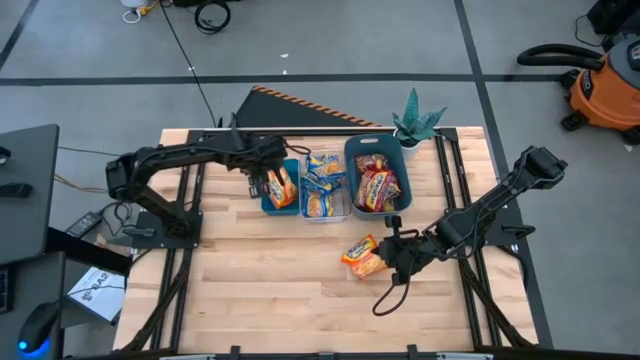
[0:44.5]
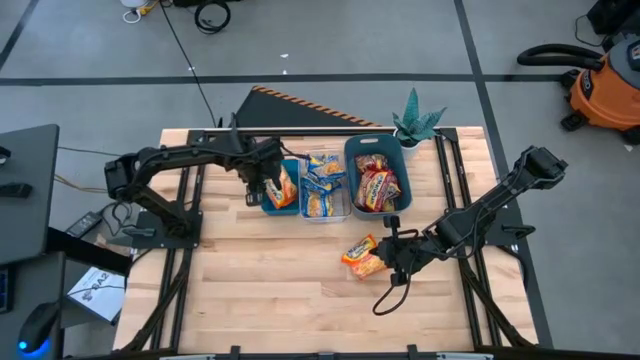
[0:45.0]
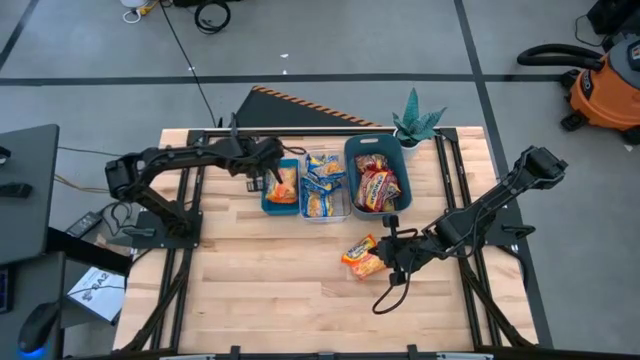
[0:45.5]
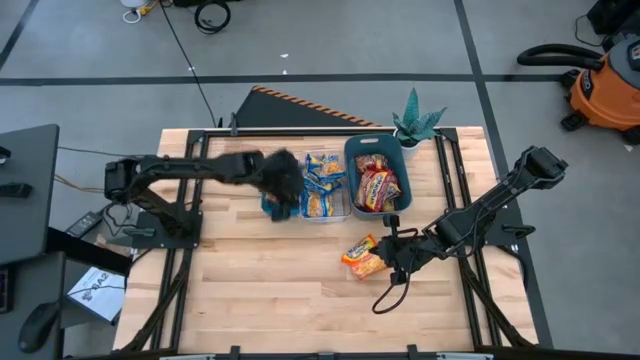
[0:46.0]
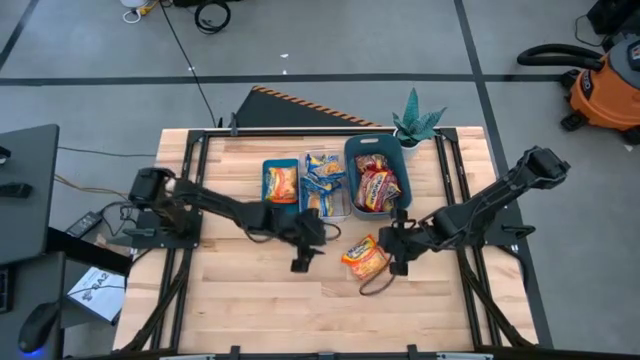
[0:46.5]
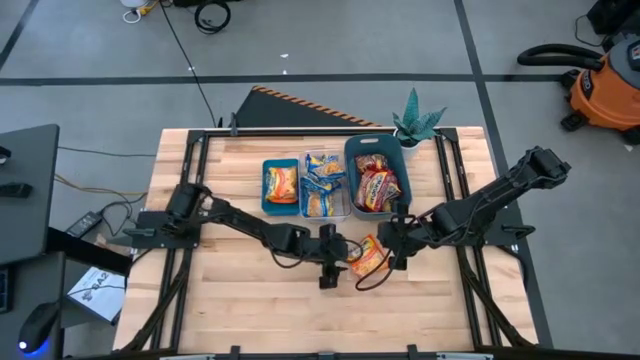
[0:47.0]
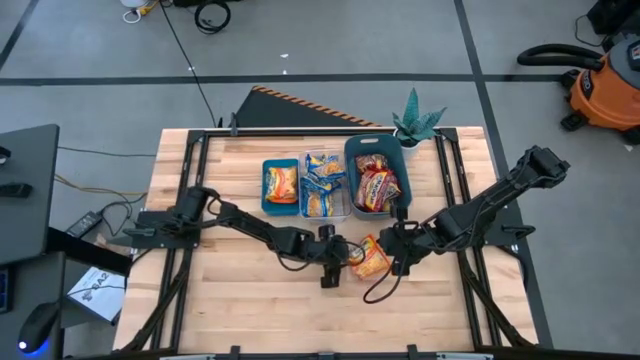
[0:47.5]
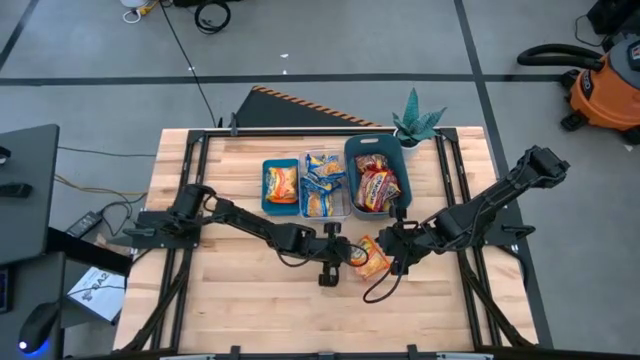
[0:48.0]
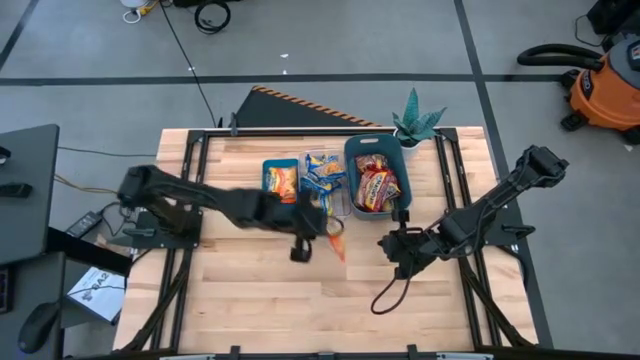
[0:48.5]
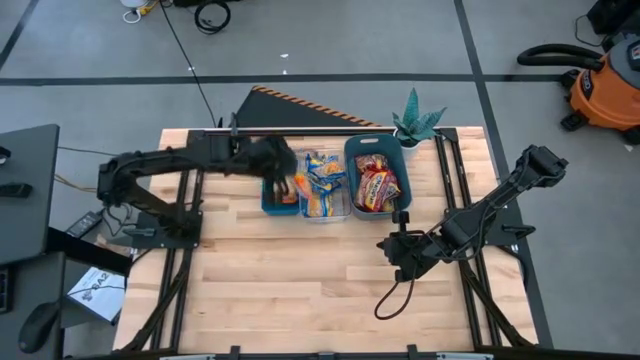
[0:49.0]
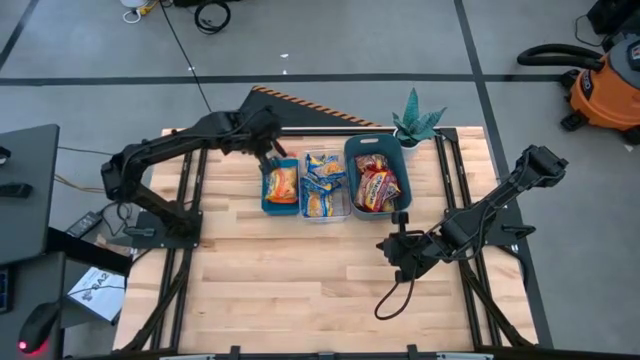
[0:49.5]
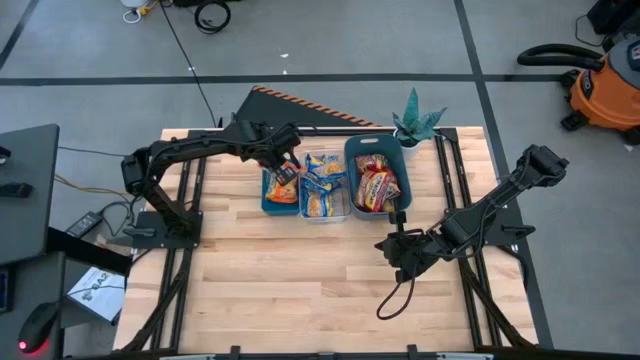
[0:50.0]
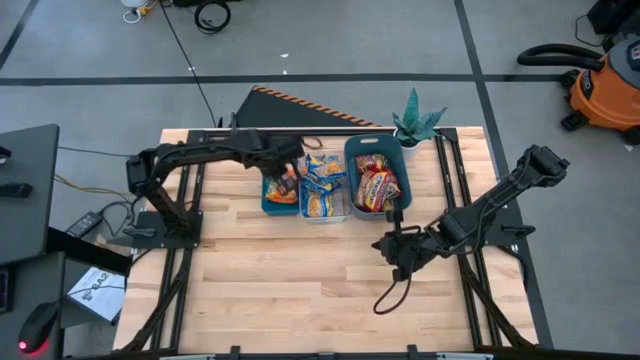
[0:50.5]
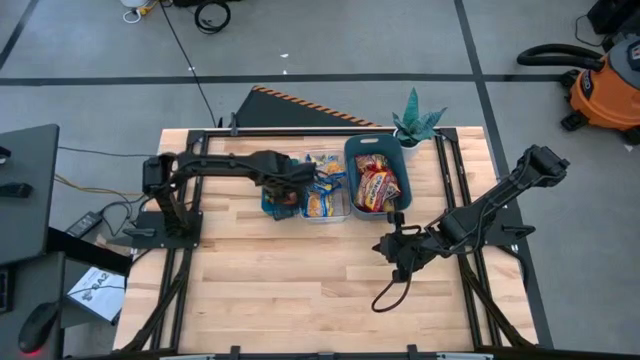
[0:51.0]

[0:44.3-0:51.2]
Task: Sort Maruchan noodles
Put the orange noodle into the blue bin

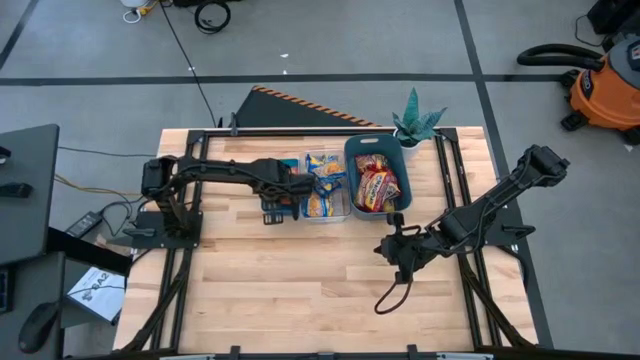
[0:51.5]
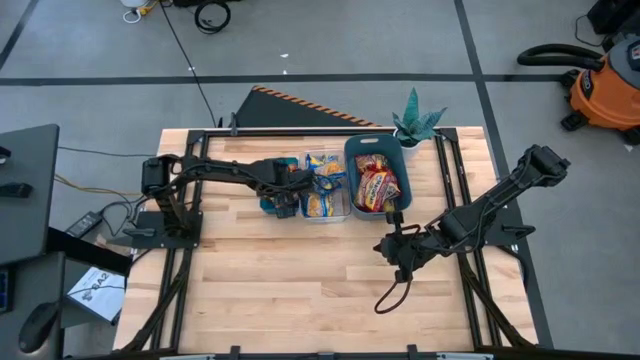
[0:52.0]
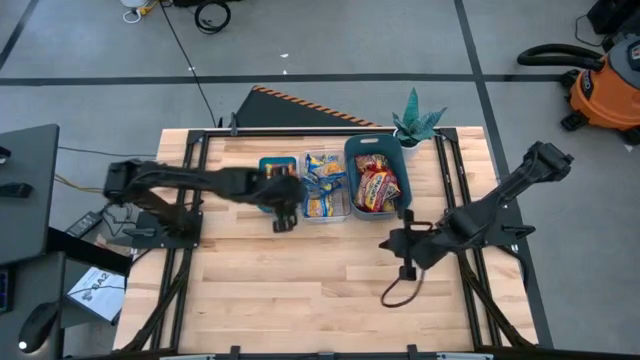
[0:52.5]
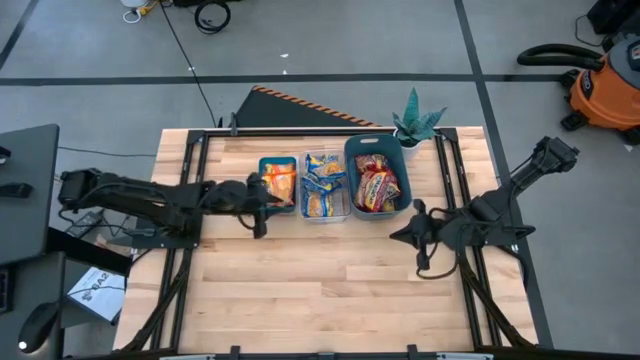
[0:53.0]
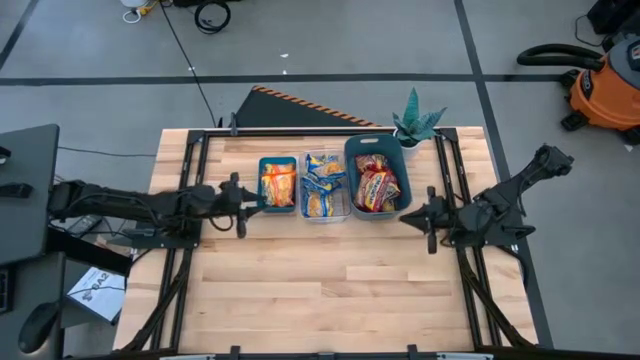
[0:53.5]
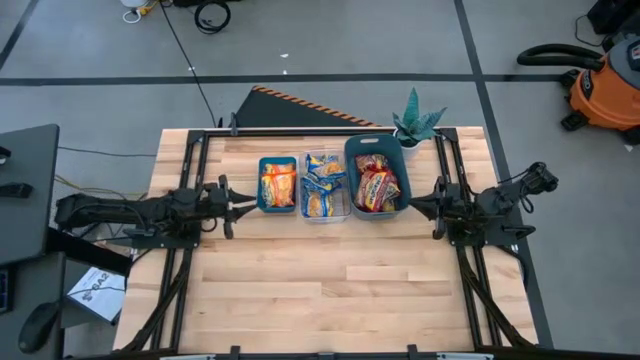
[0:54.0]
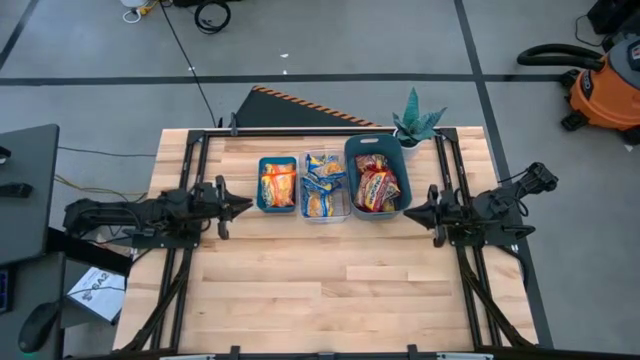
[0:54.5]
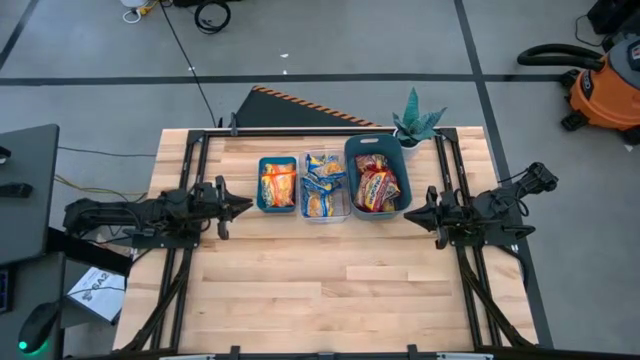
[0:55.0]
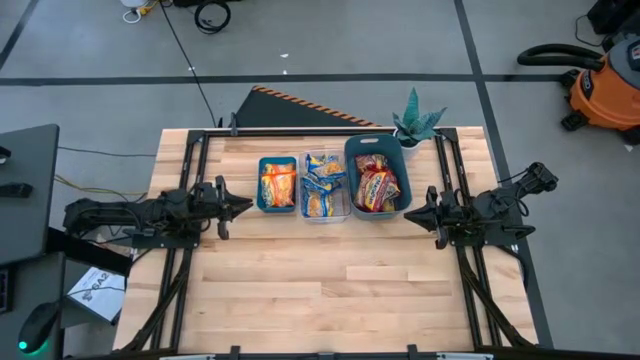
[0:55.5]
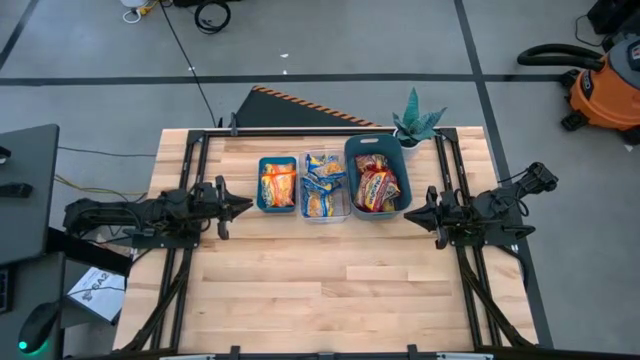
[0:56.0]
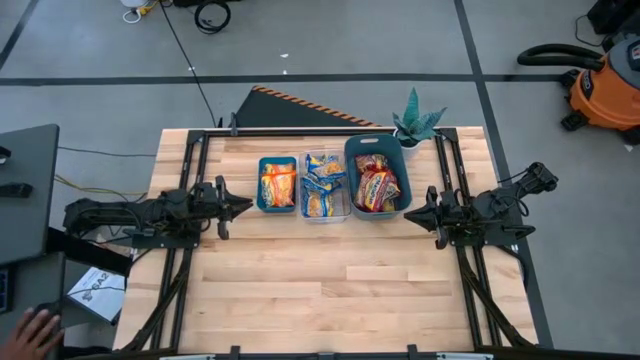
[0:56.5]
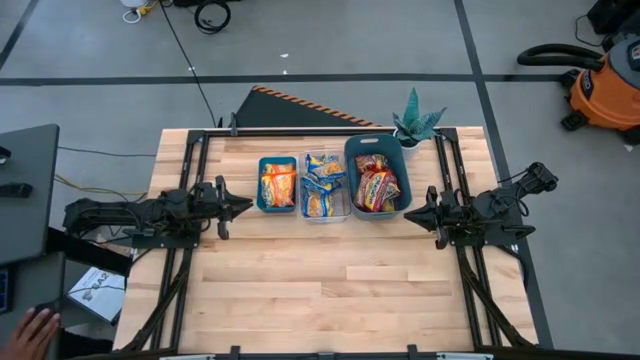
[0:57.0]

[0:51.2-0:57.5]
Return to Home Position

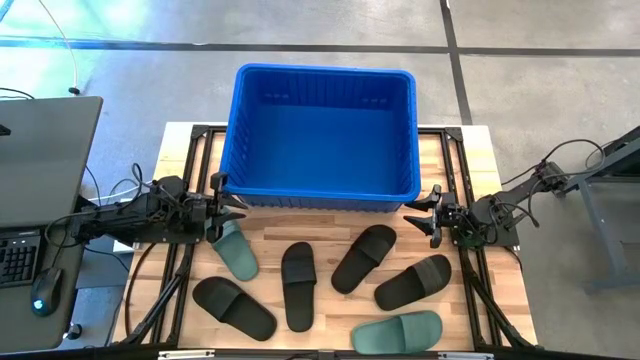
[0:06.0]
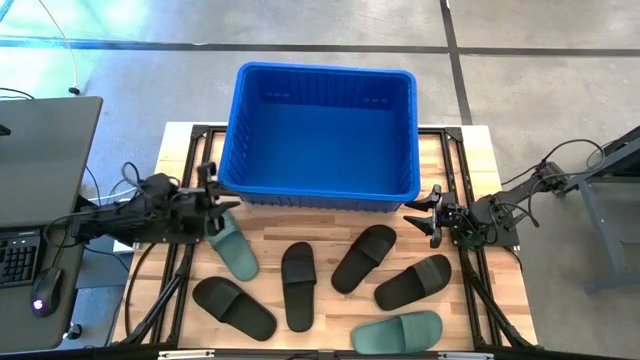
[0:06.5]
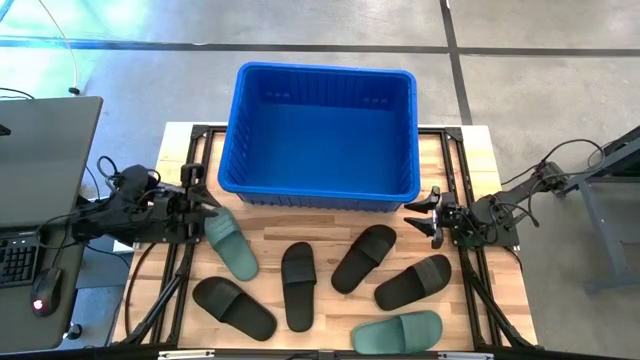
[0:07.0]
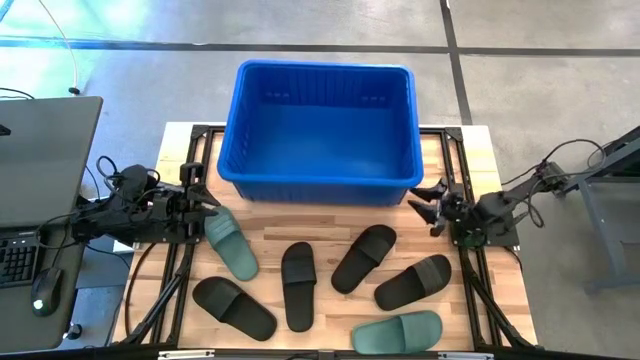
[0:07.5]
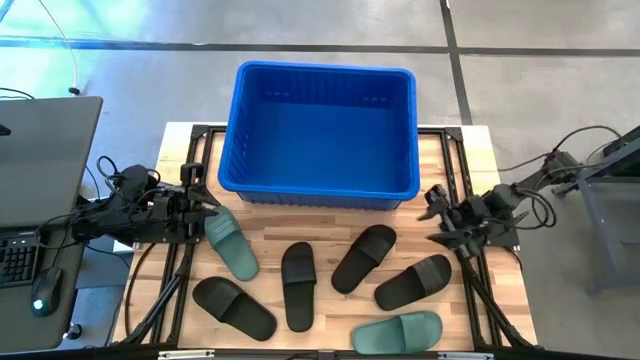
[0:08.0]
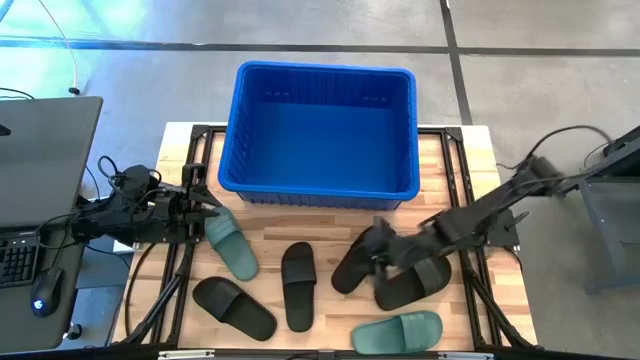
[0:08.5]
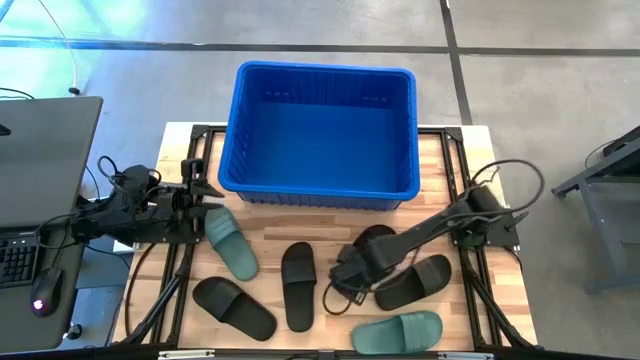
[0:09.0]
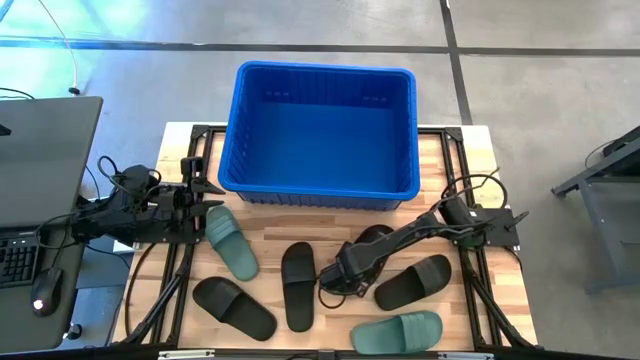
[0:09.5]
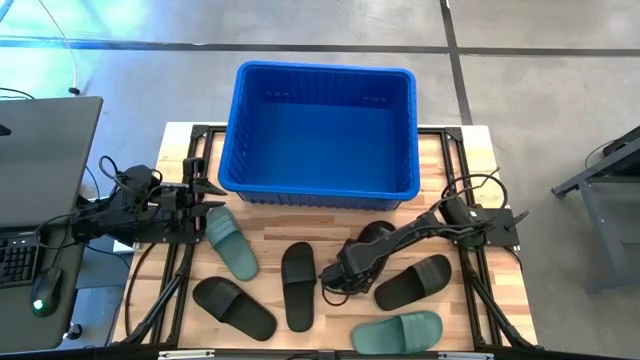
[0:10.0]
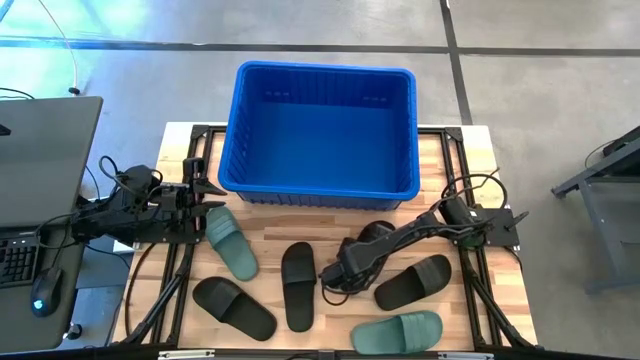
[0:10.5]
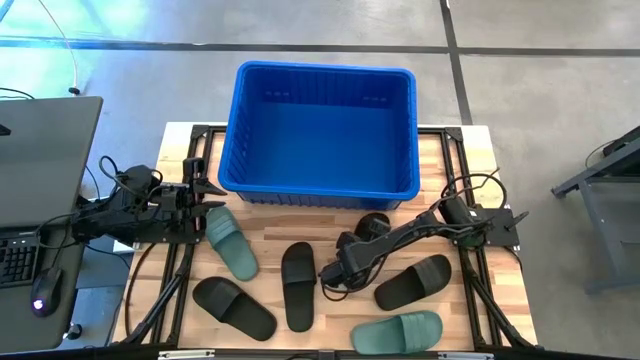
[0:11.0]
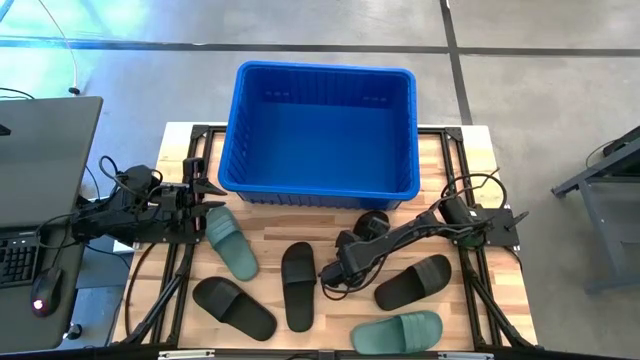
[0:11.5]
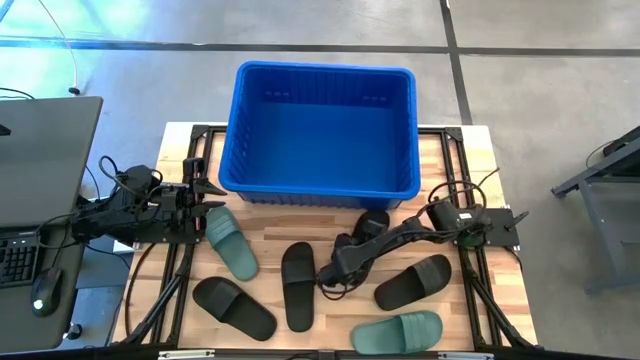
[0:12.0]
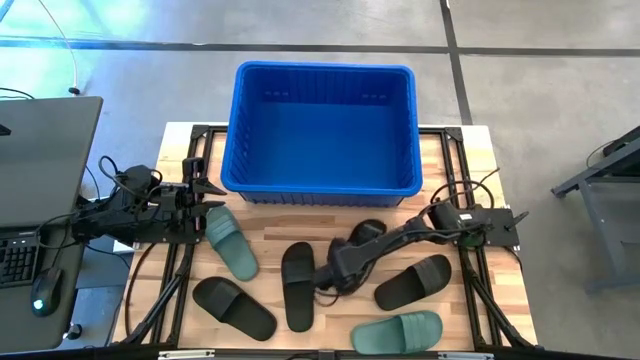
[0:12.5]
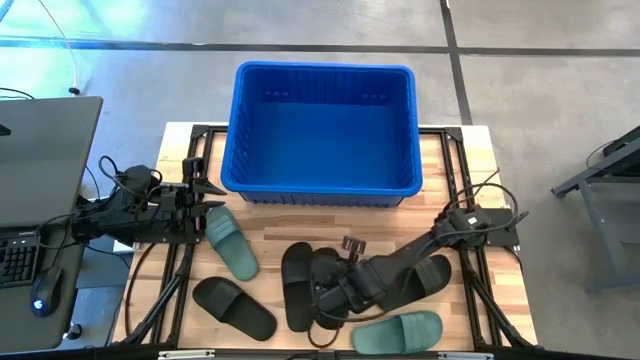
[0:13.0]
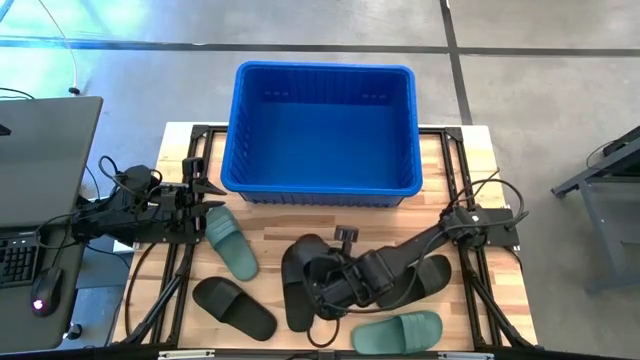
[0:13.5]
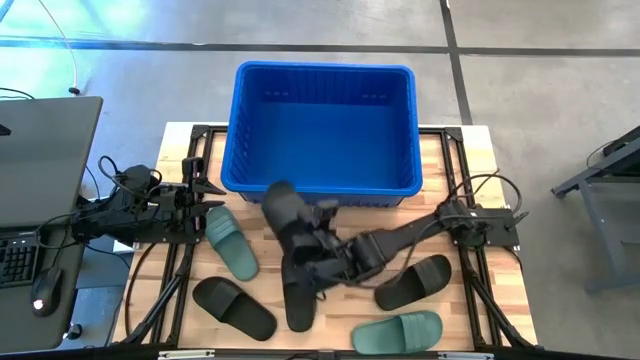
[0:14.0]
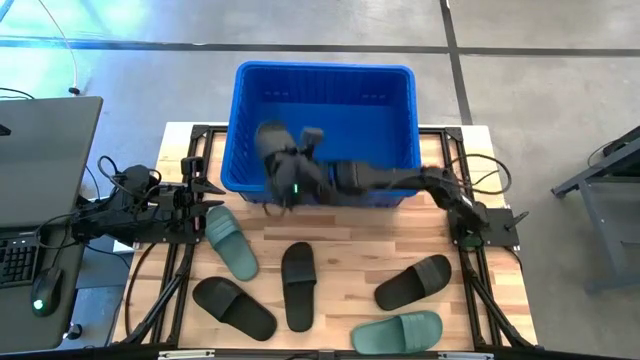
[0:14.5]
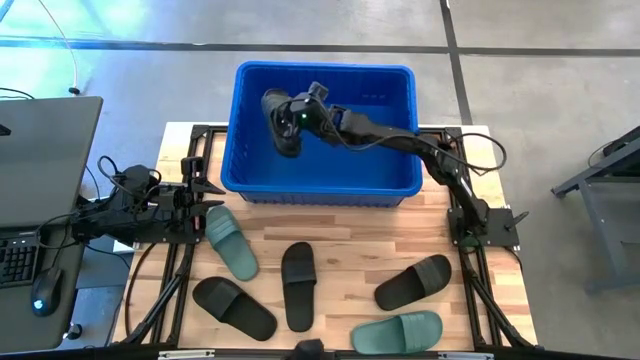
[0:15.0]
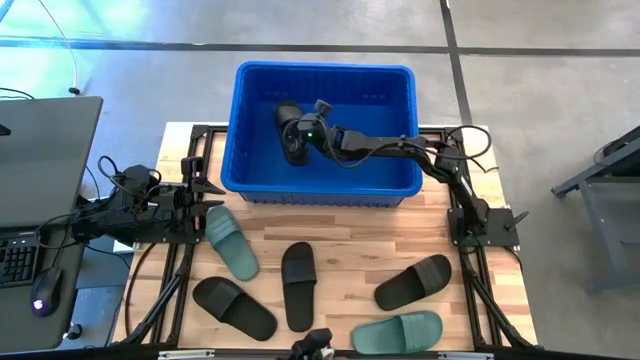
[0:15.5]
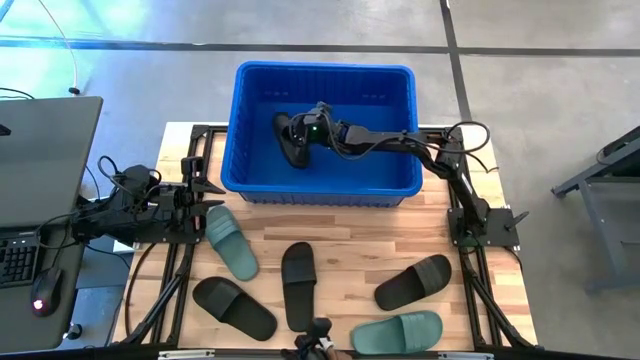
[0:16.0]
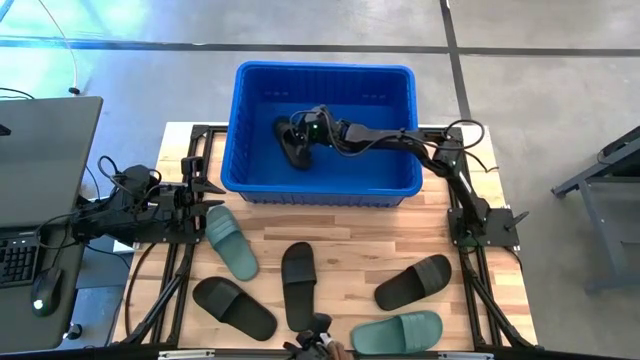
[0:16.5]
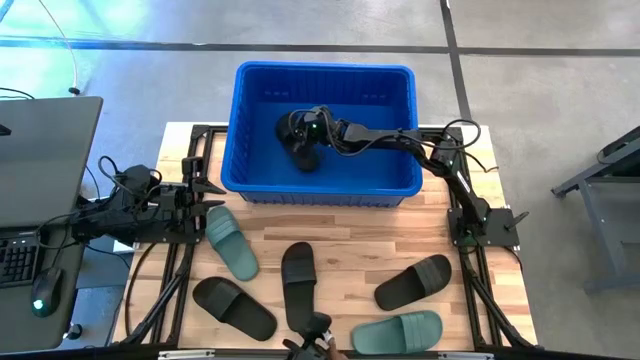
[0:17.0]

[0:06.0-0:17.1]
Task: Pick and place slides into bin
Put the black slide into the blue bin
